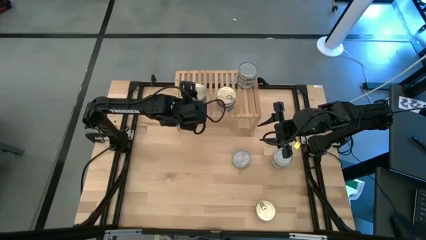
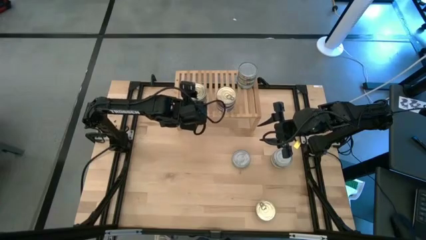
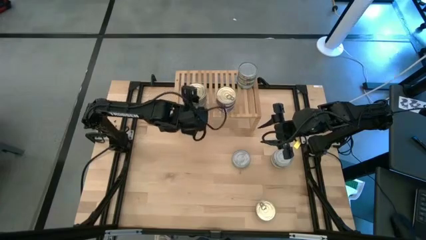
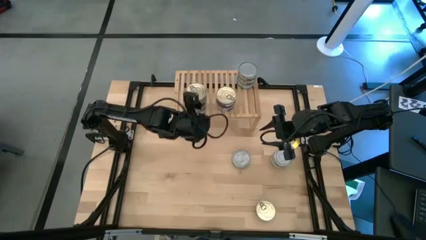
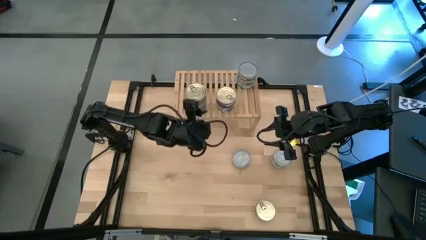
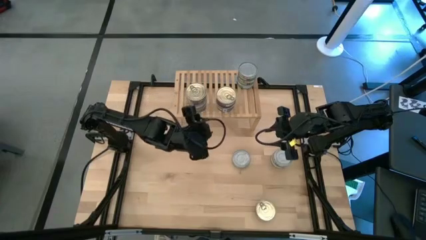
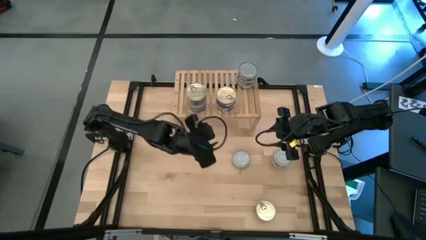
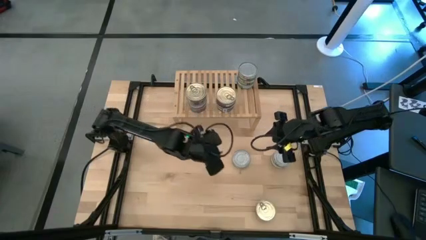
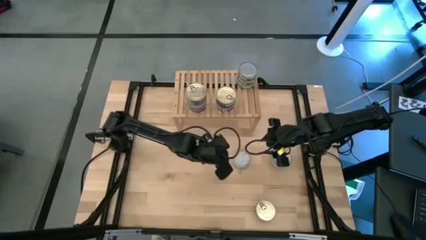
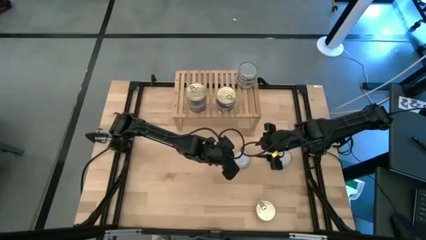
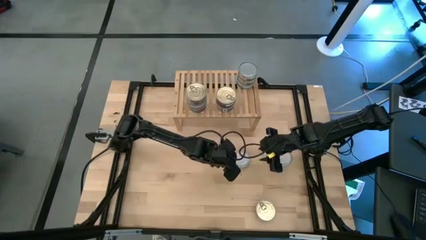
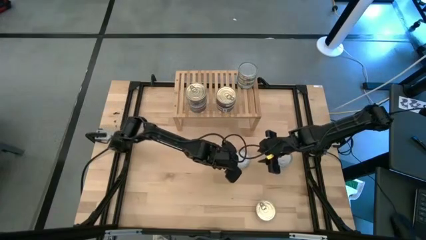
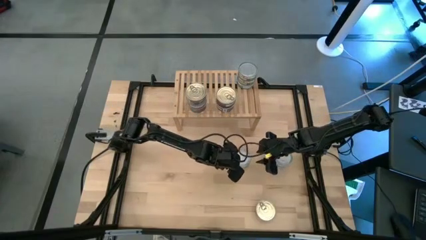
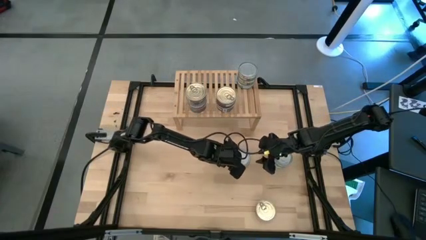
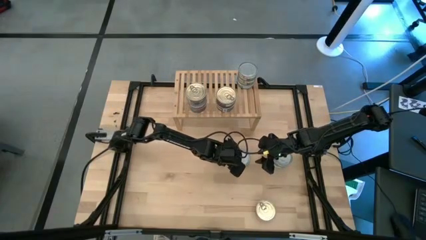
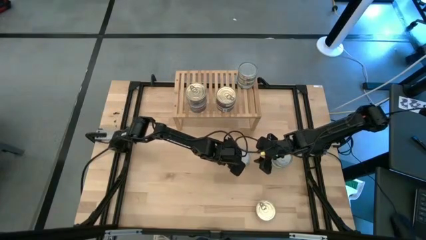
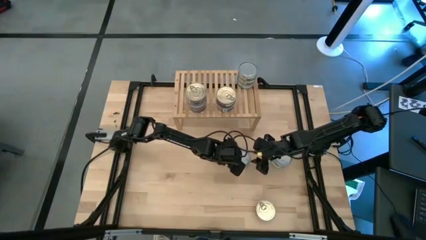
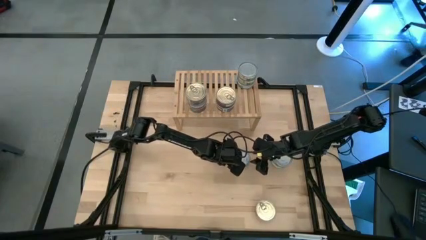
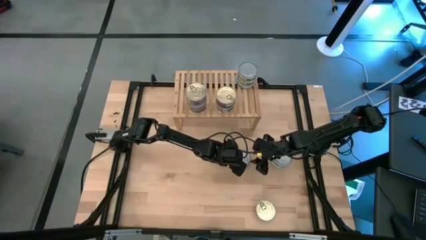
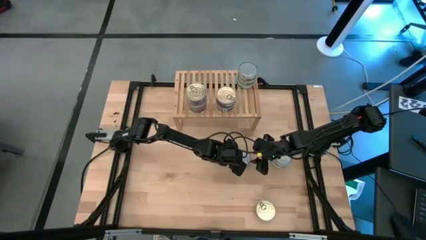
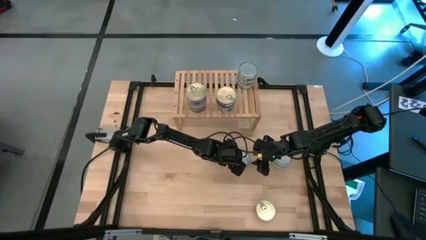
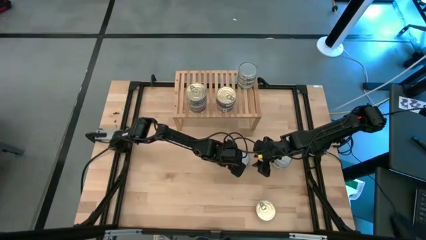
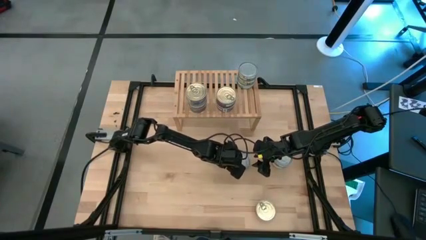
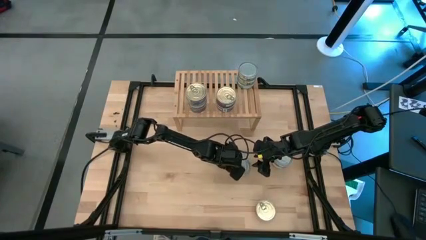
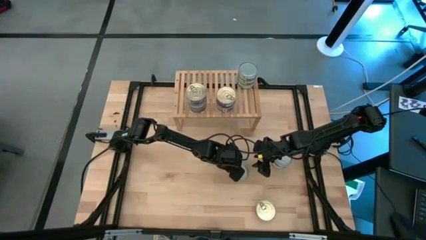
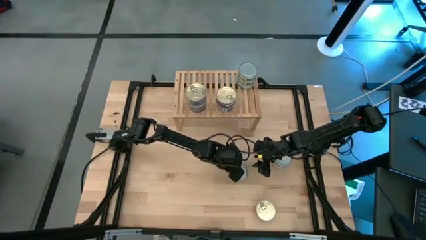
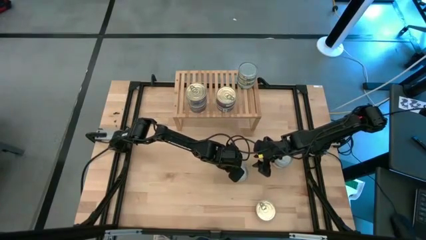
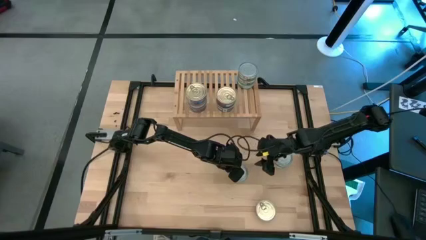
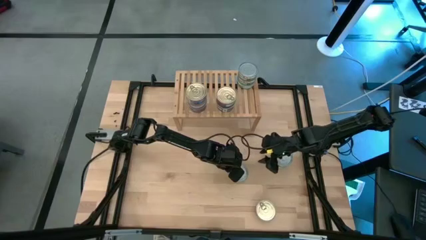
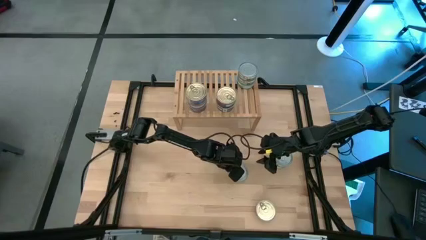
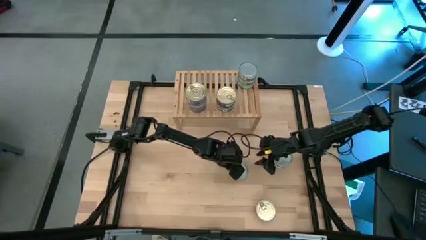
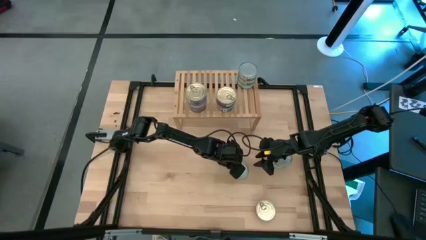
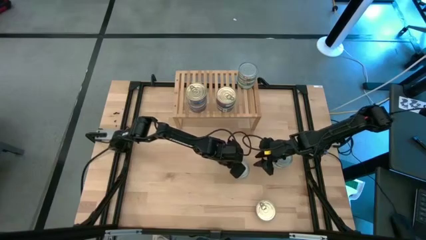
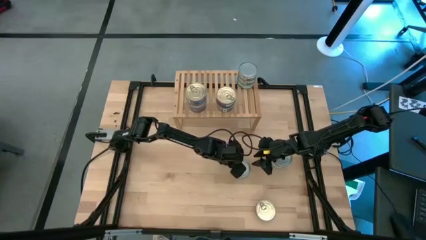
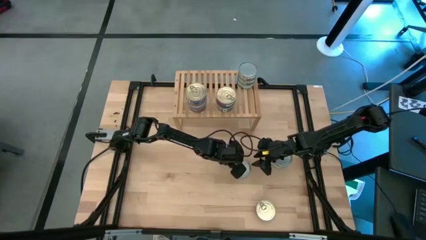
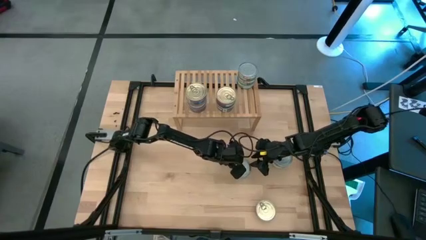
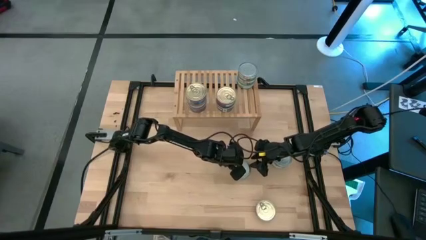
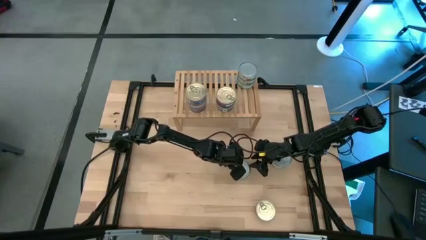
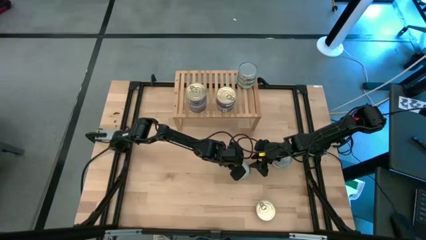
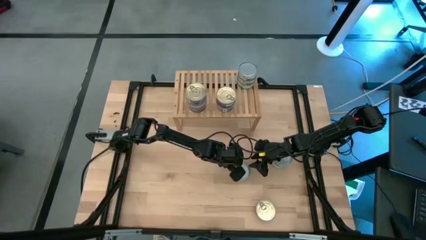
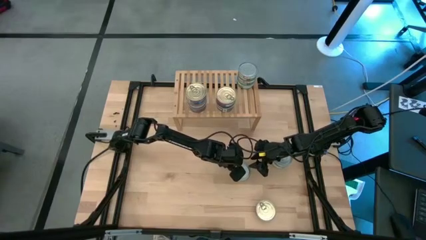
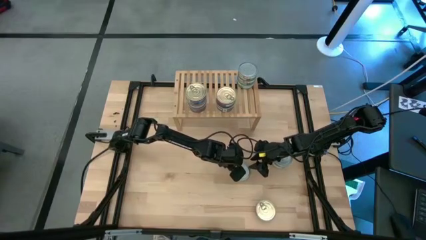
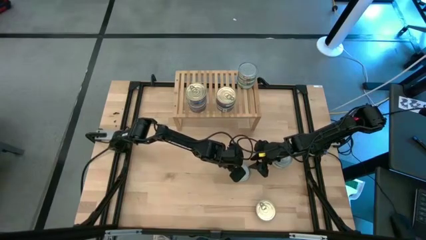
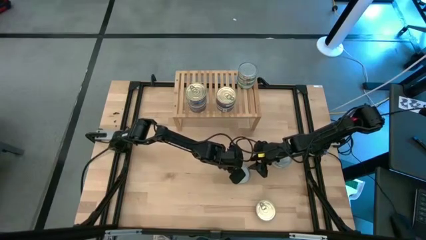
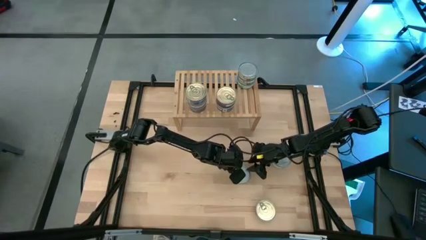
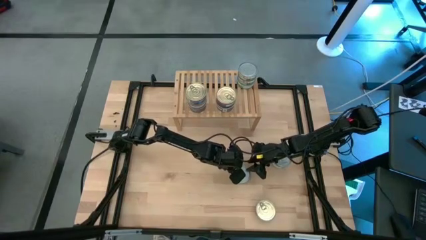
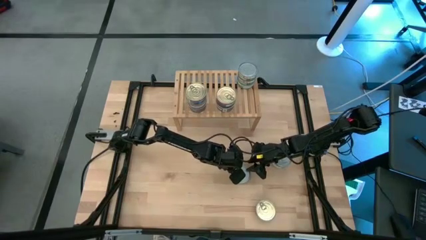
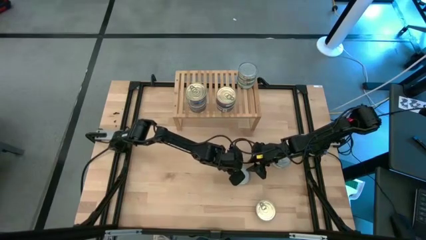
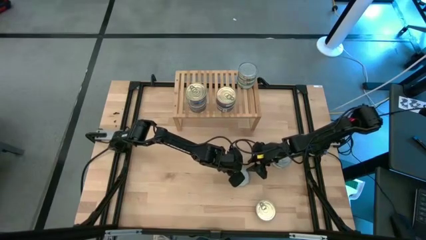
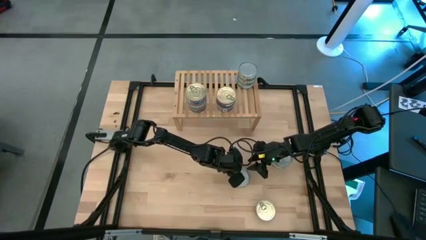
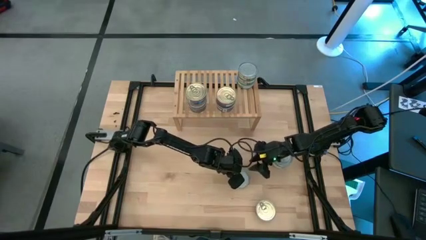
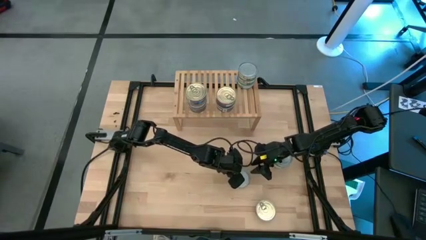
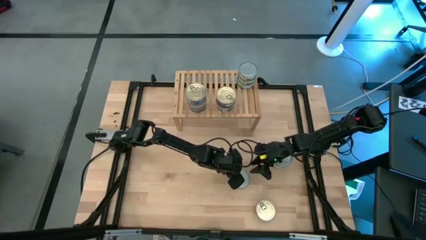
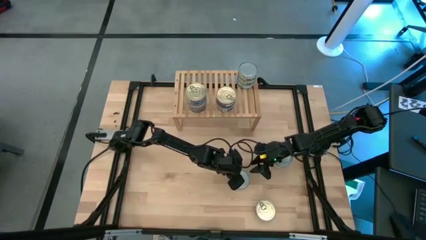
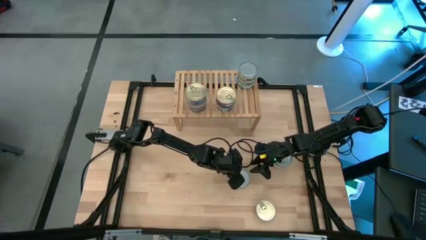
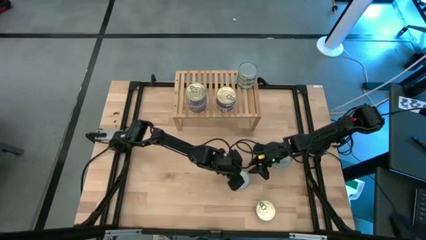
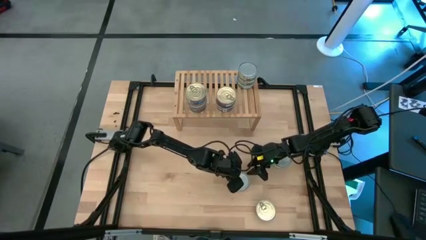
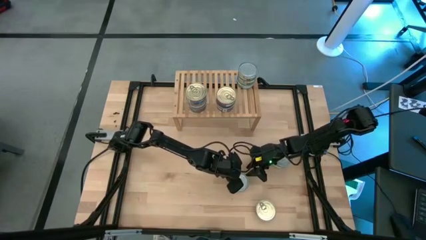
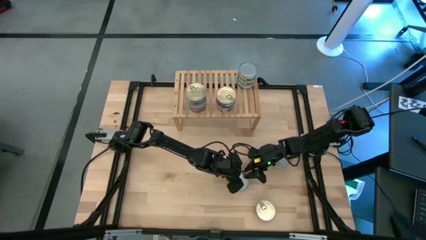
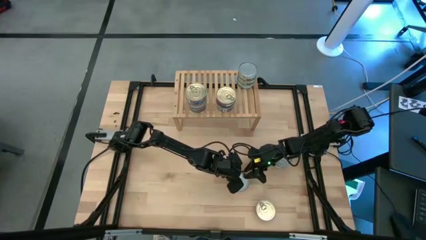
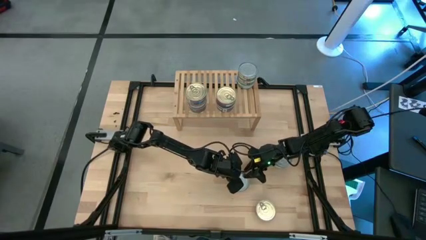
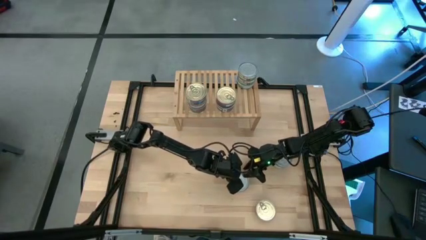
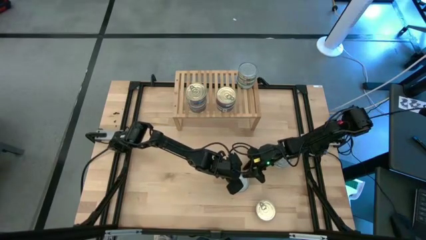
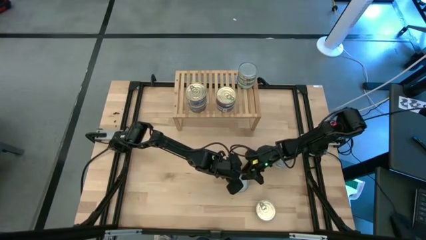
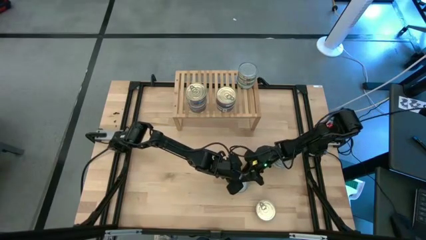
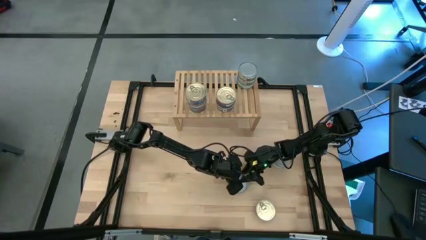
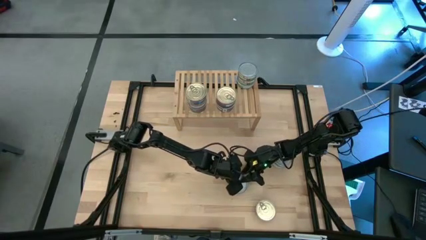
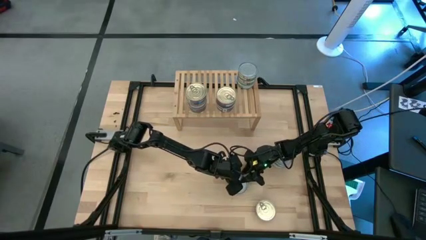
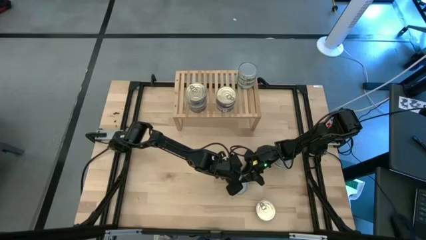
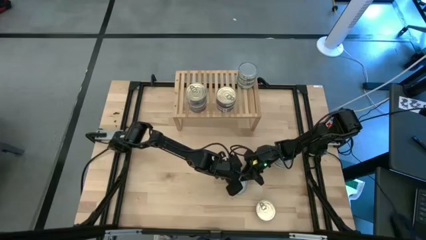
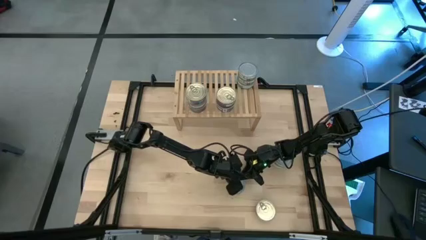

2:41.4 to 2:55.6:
Task: Stack canned seafood by type on shelf
Put the green tuna can on the shelf
